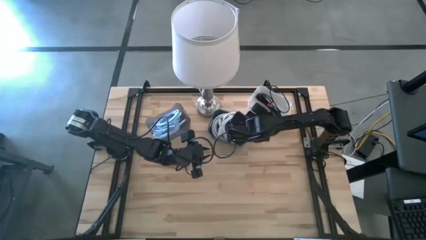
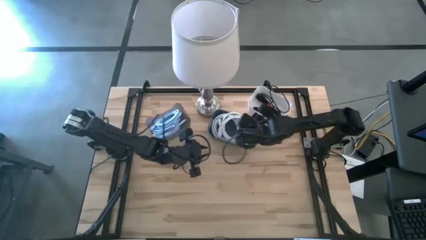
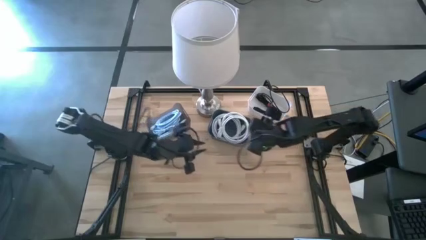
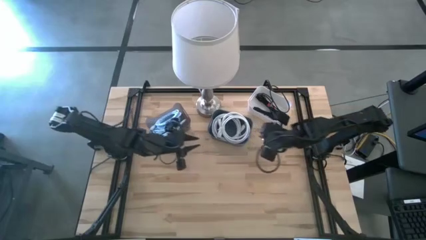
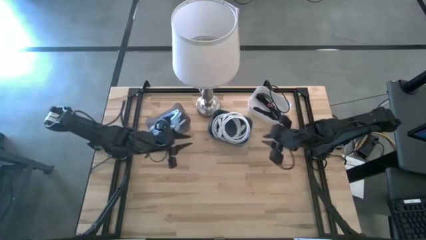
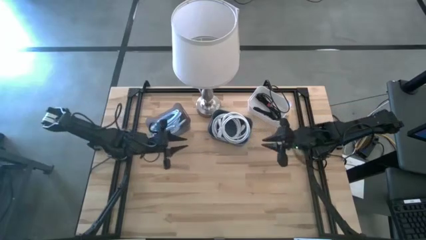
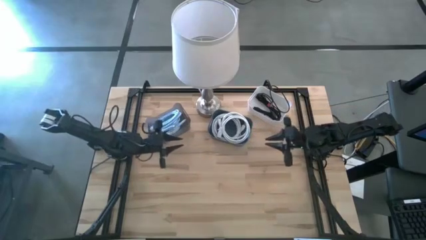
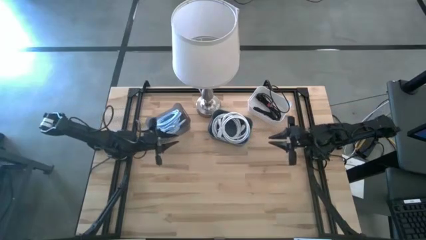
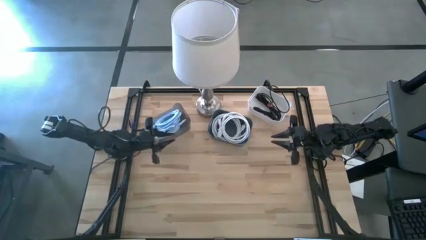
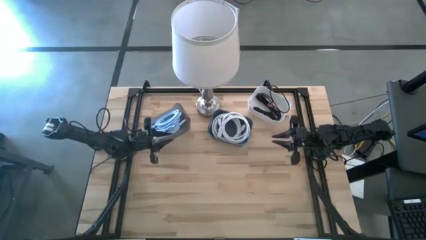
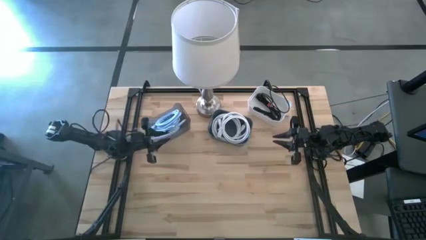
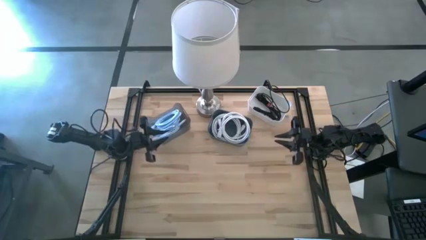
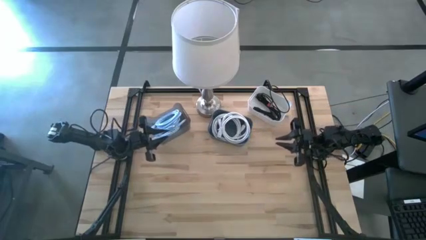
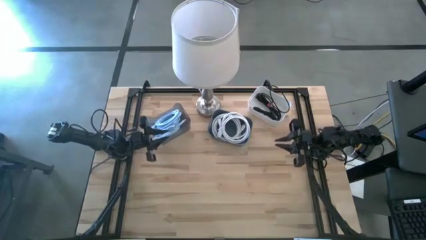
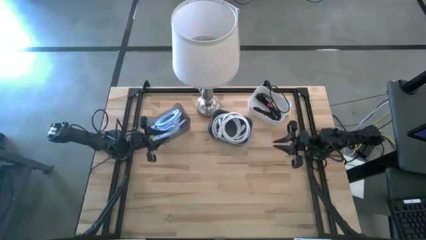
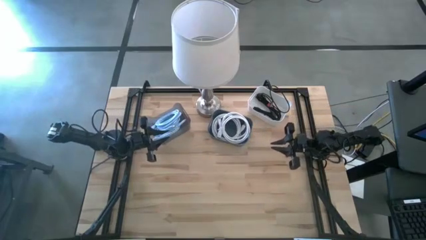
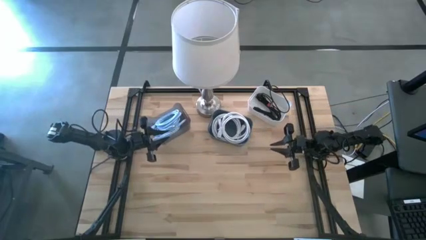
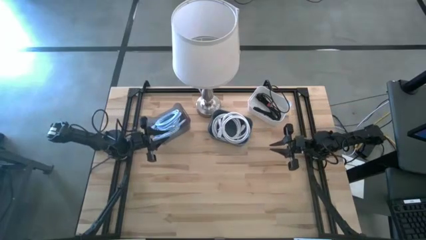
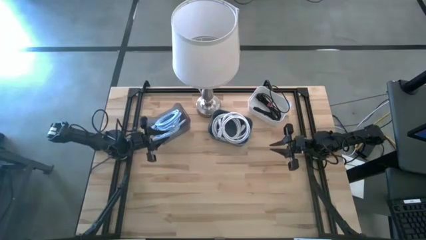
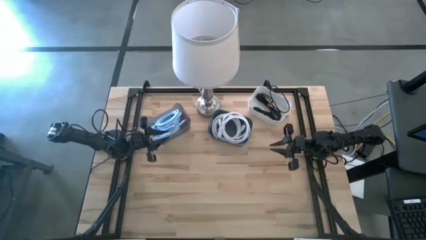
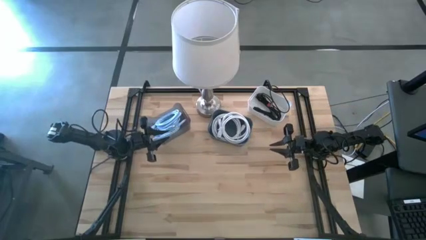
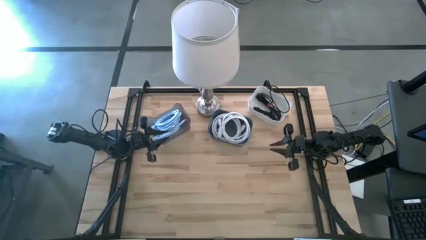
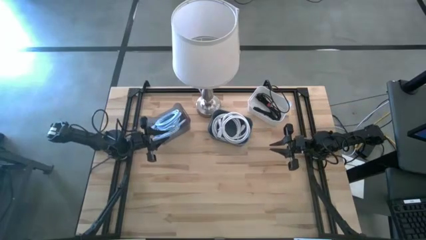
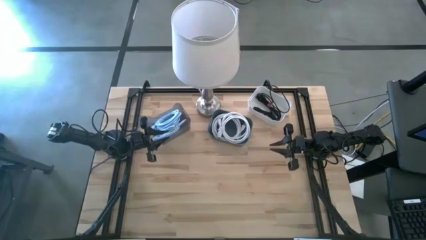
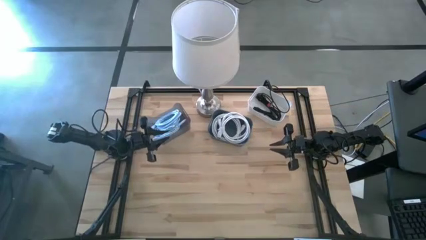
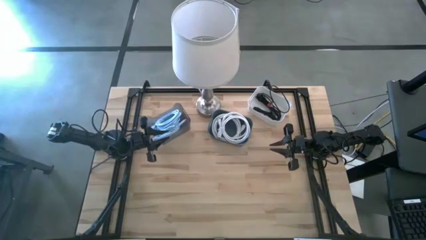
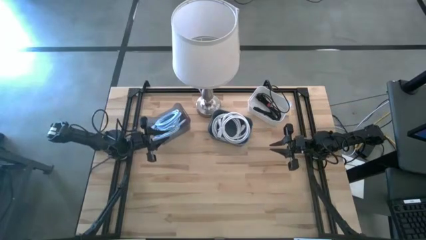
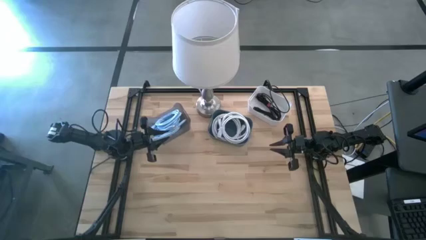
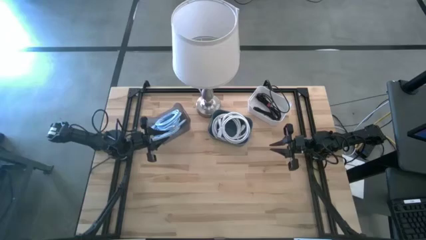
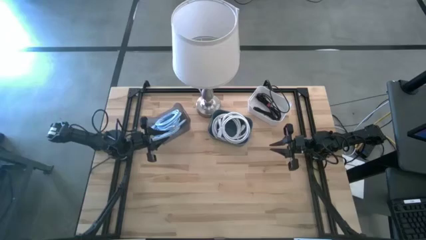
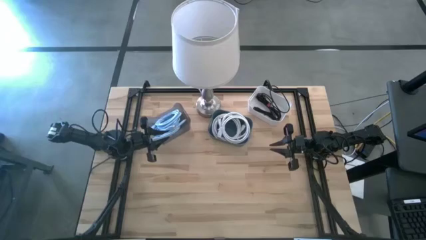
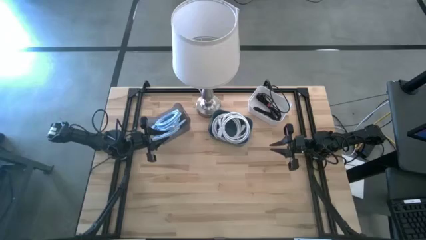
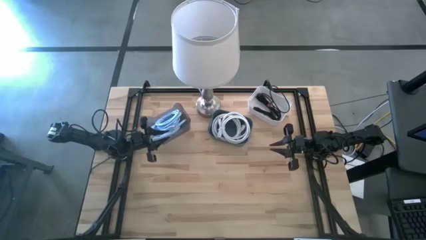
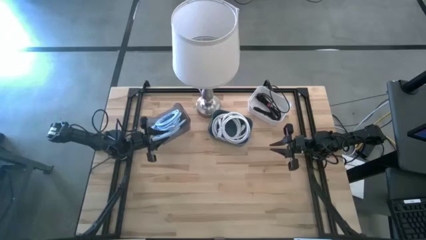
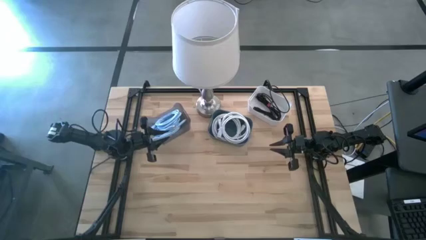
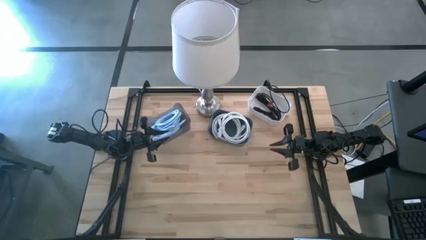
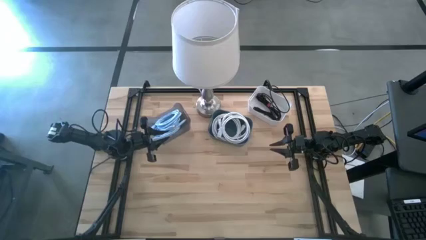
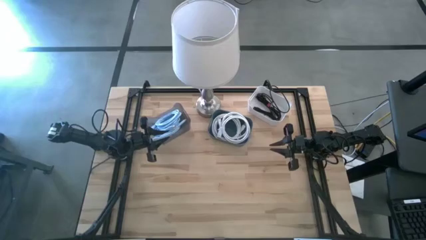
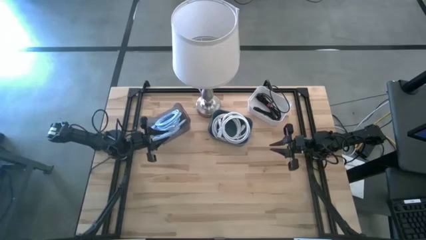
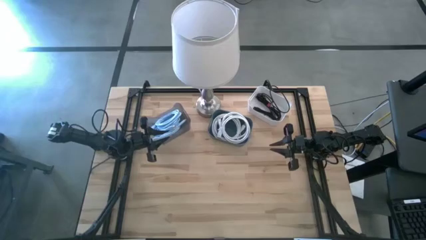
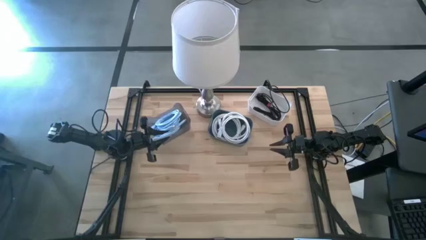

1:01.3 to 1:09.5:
Task: Pick & Place USB Port
Return to Home Position

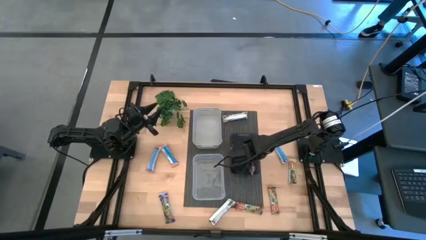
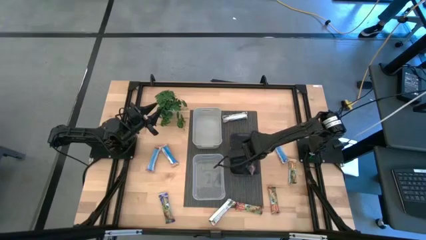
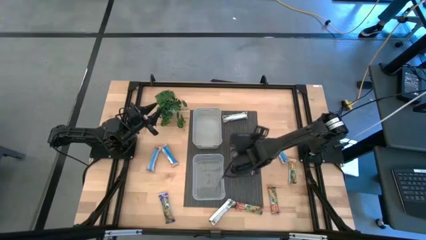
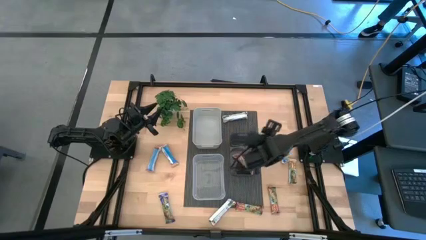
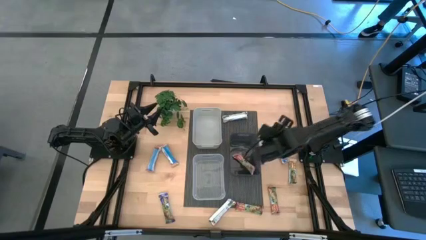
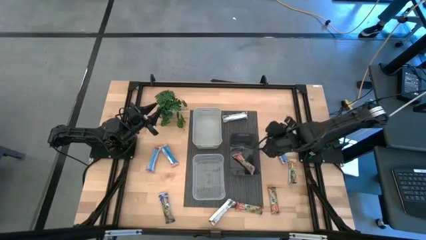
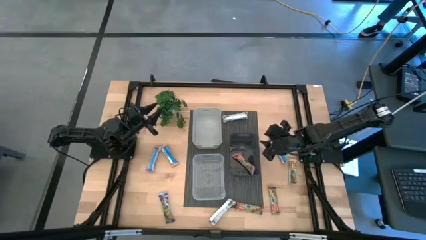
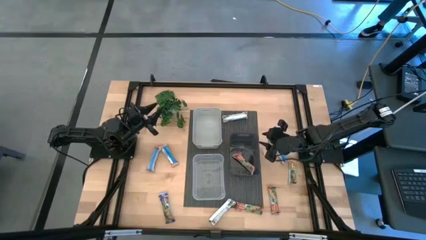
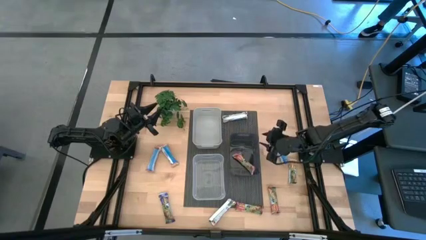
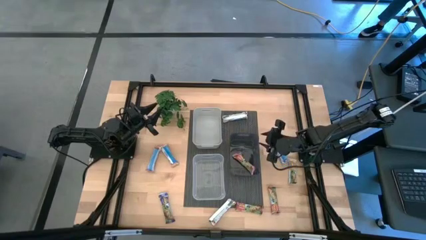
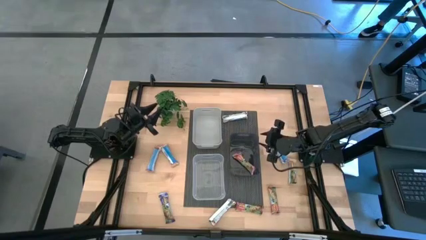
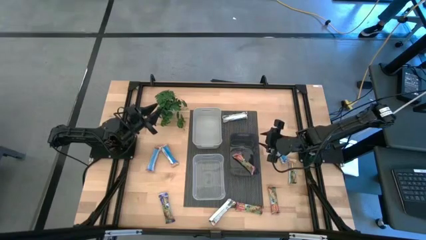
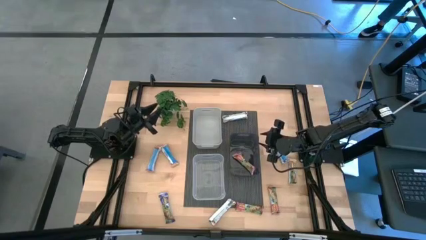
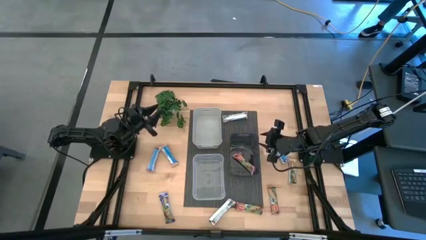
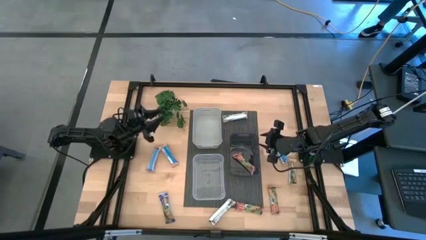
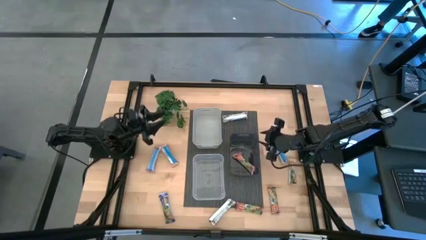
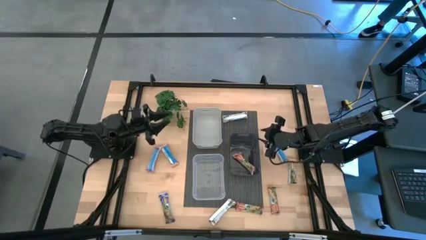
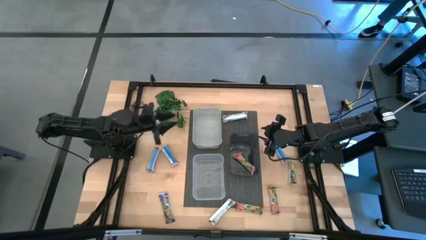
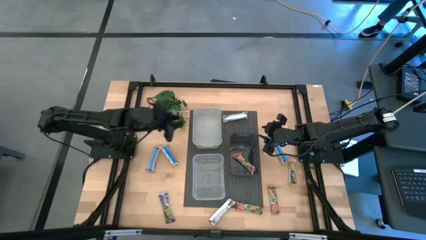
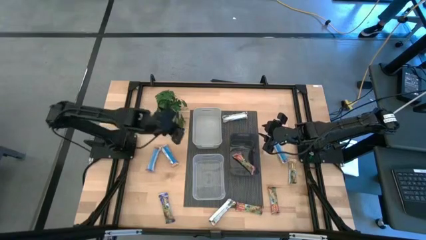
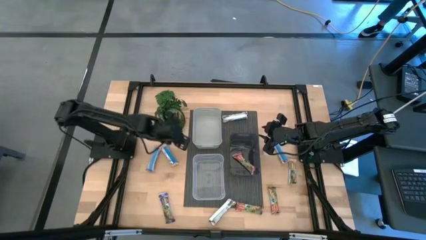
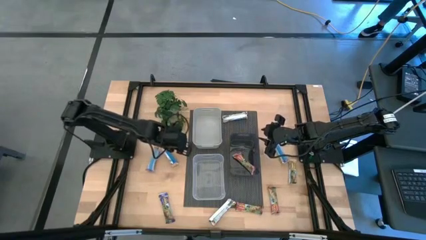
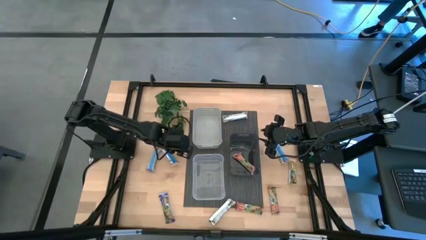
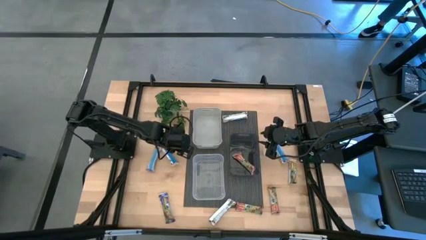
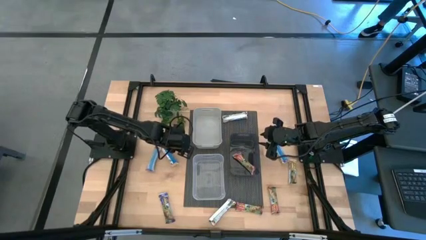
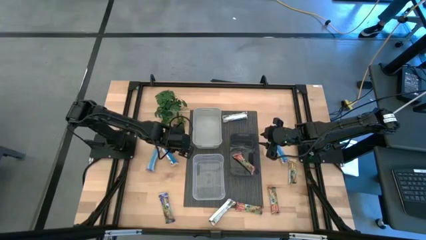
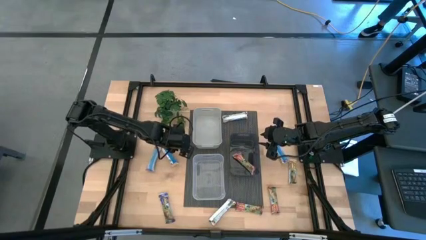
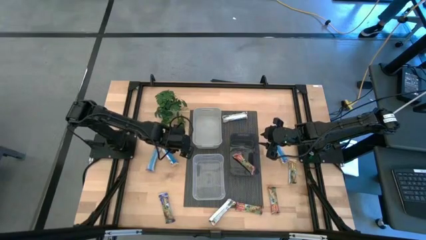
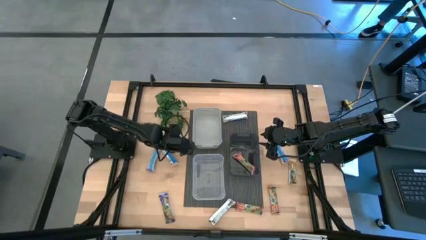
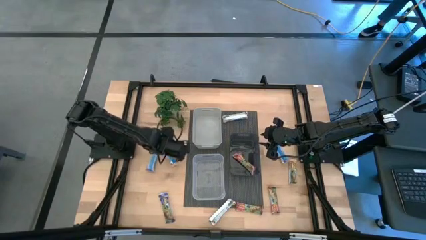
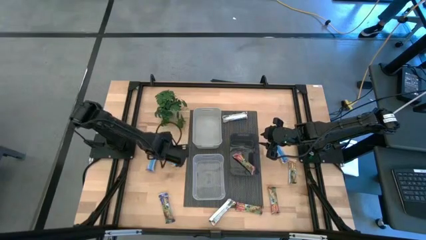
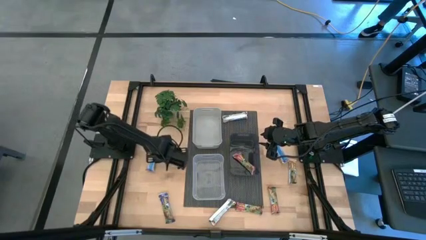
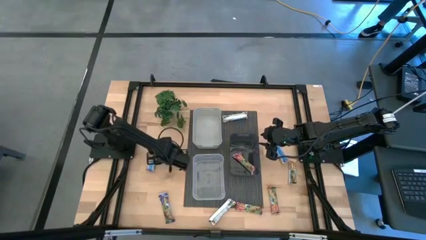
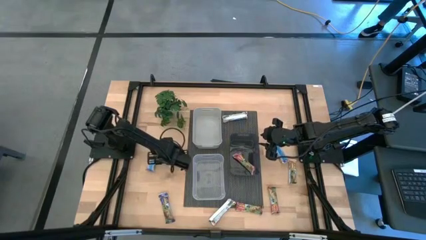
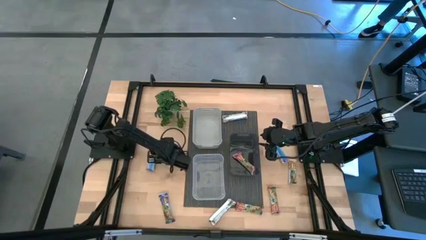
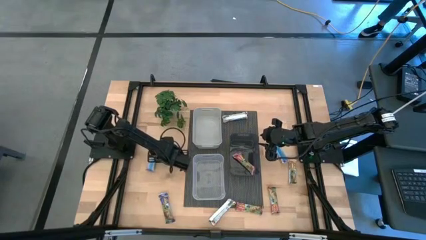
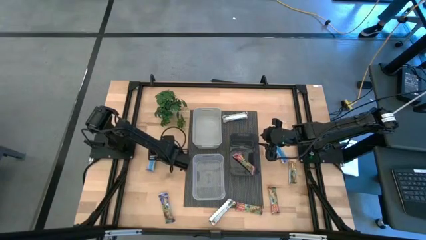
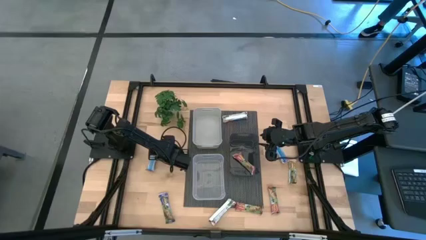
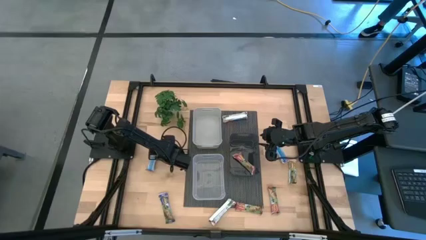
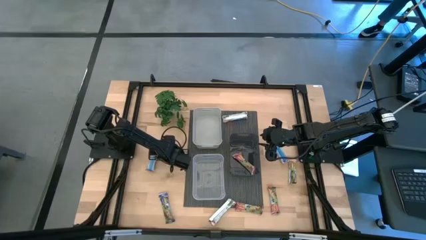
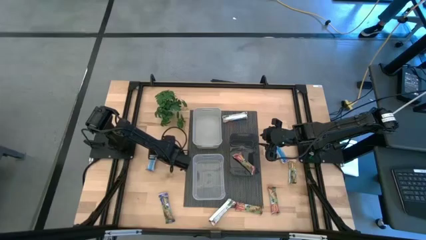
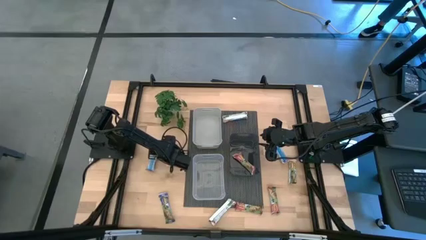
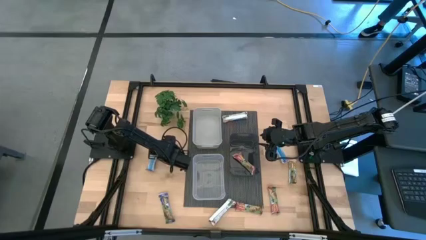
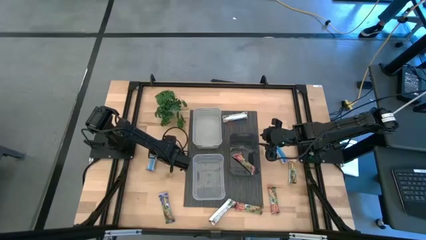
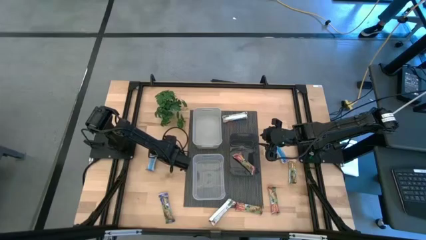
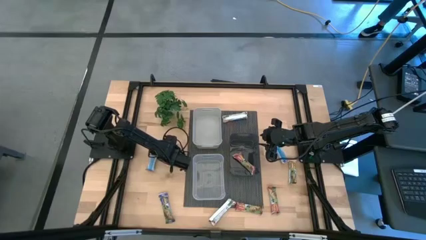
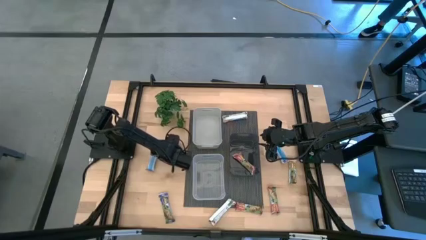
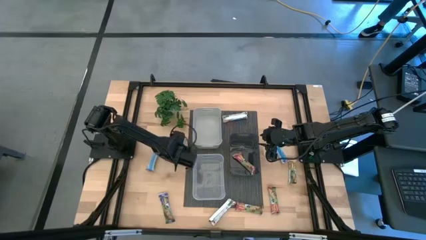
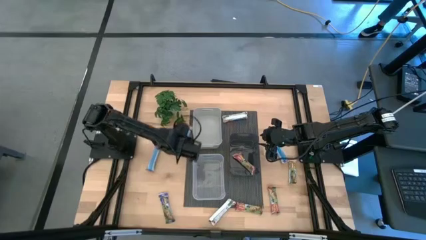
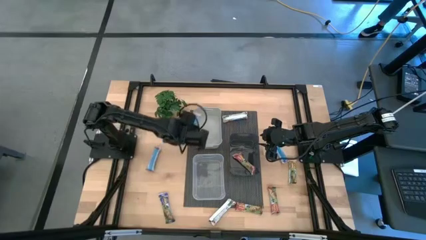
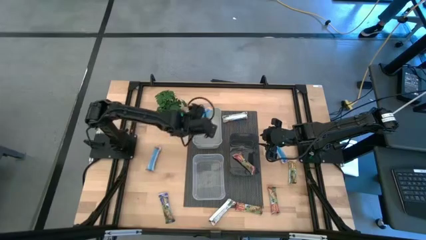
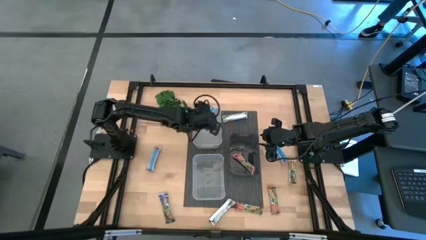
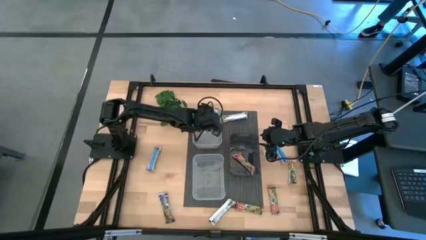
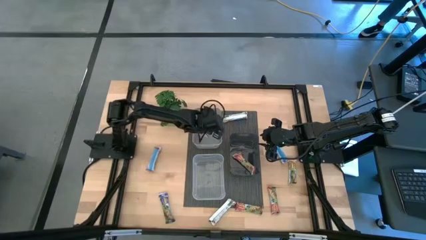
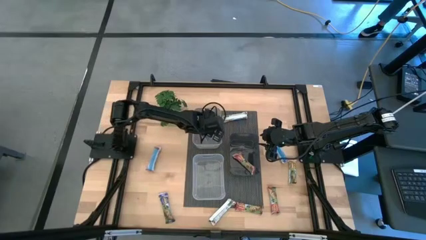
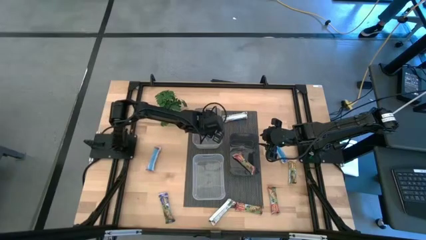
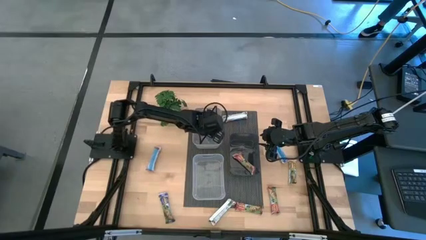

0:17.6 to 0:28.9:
Task: Pick and place Granola Bars by type
Put the yellow granola bar into the gray bin
